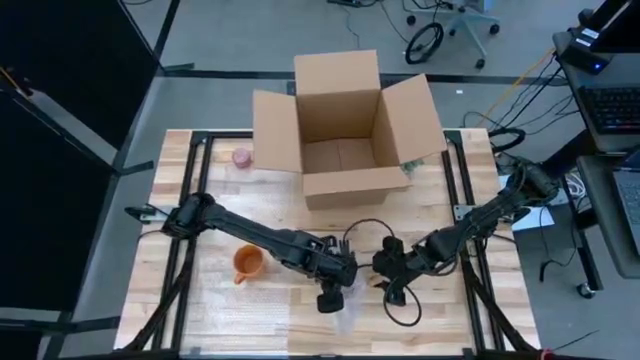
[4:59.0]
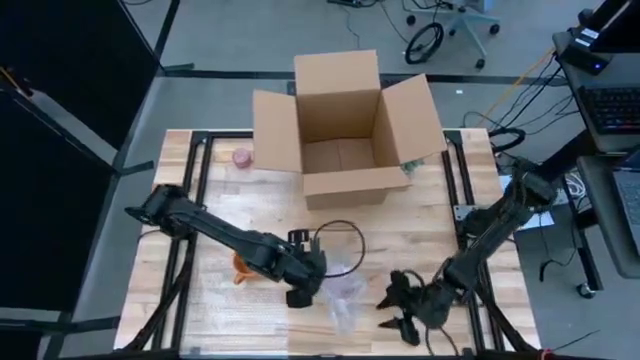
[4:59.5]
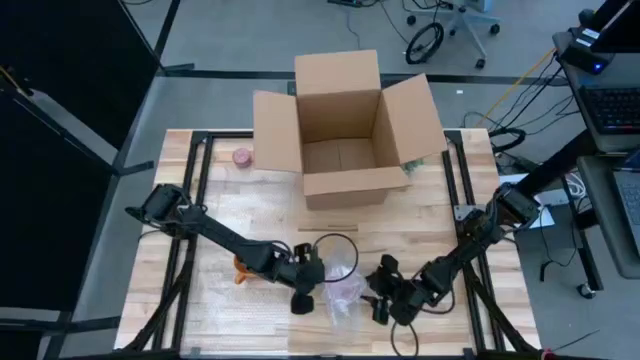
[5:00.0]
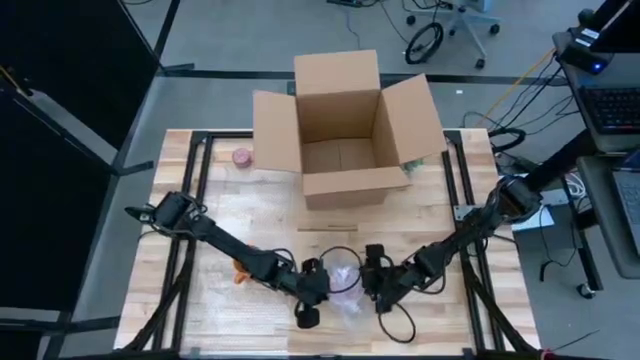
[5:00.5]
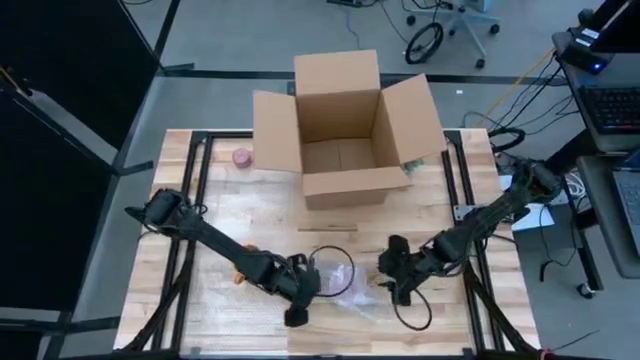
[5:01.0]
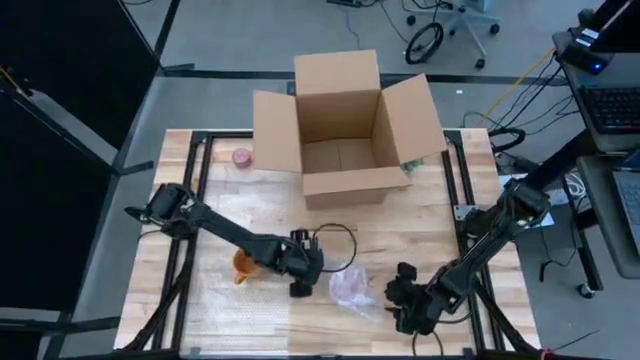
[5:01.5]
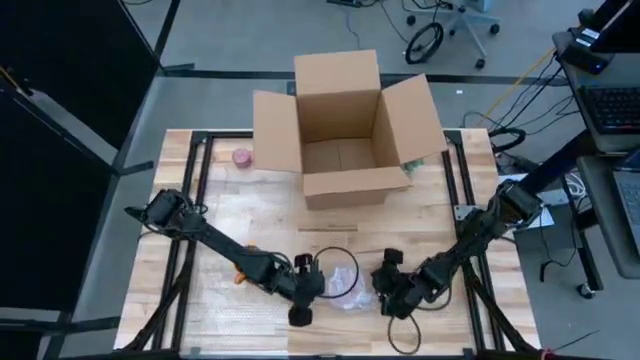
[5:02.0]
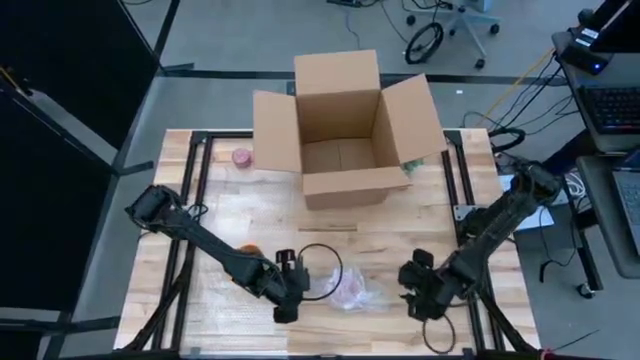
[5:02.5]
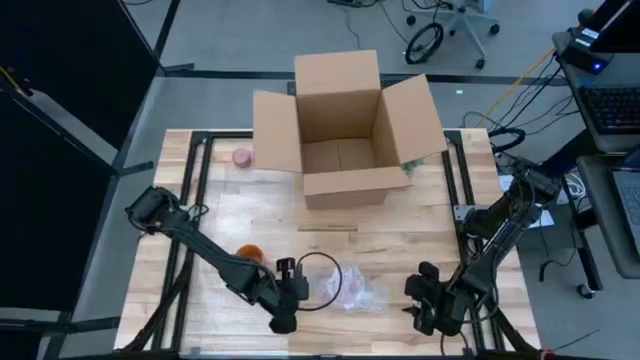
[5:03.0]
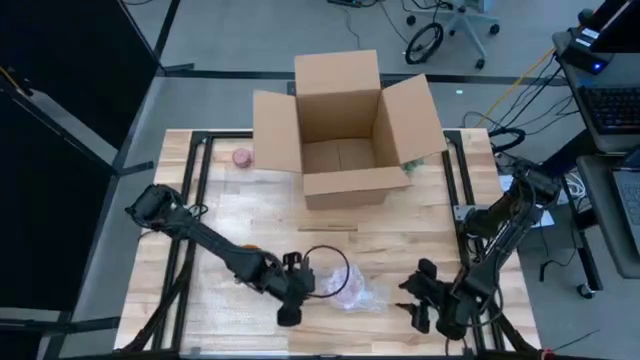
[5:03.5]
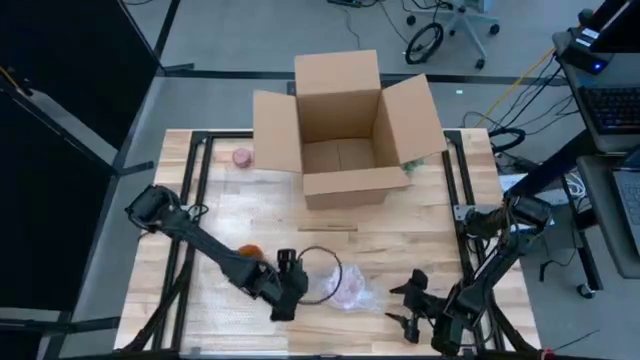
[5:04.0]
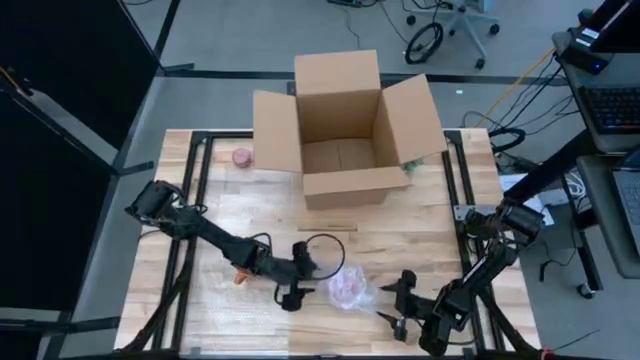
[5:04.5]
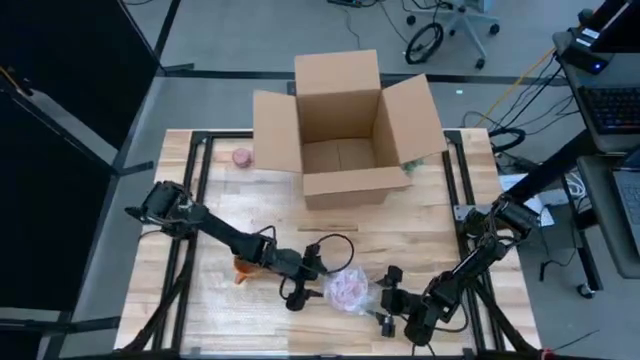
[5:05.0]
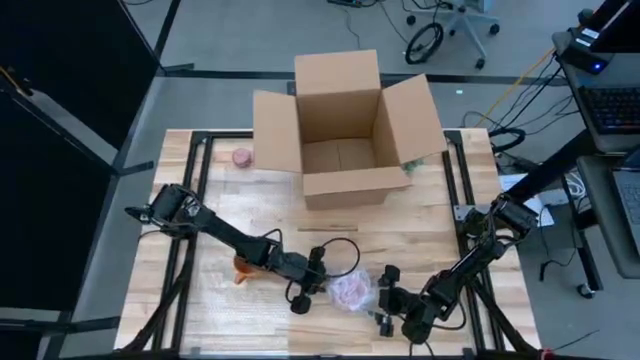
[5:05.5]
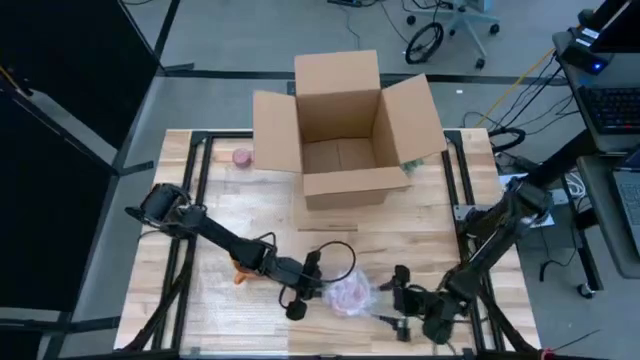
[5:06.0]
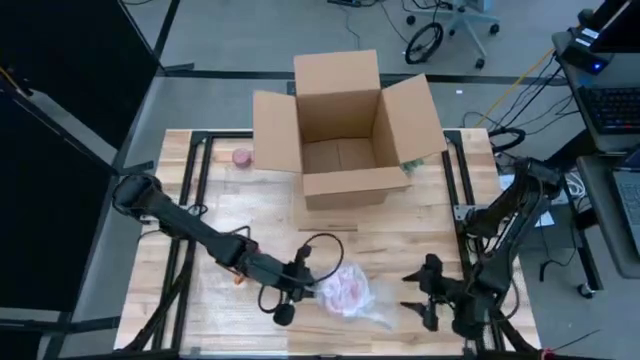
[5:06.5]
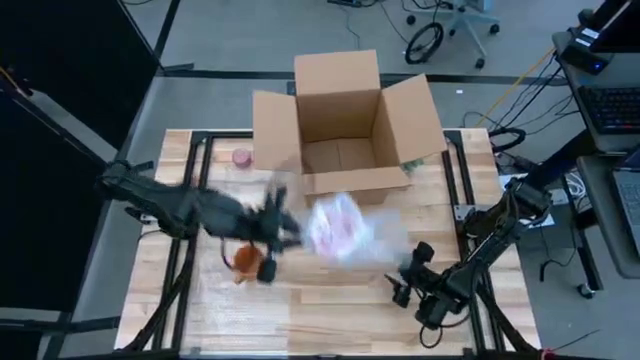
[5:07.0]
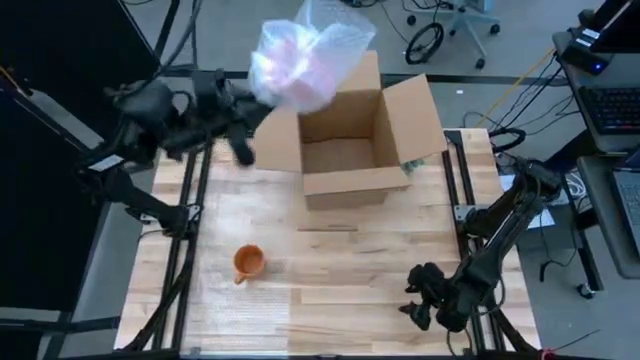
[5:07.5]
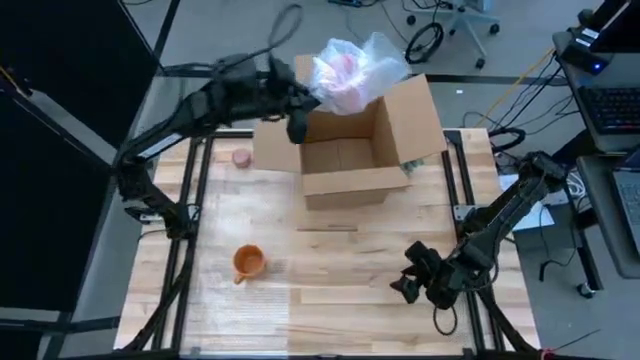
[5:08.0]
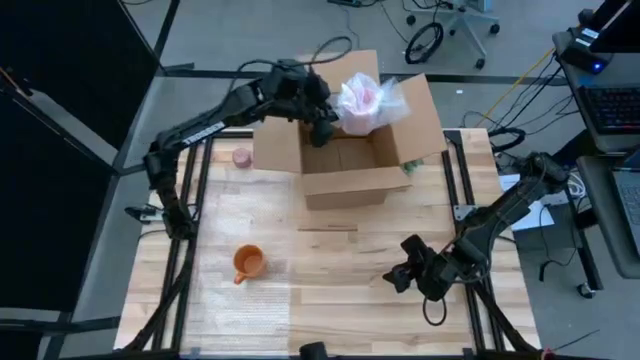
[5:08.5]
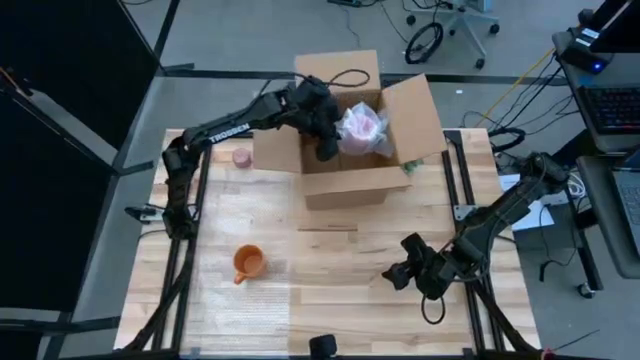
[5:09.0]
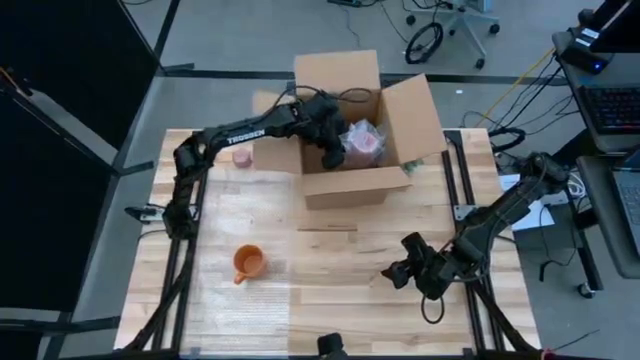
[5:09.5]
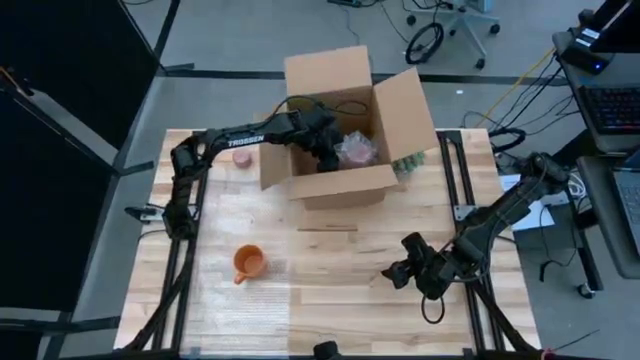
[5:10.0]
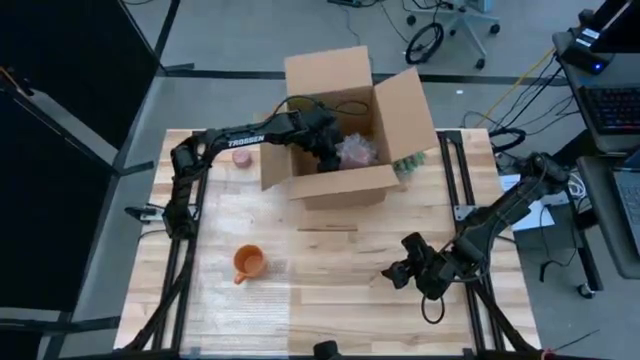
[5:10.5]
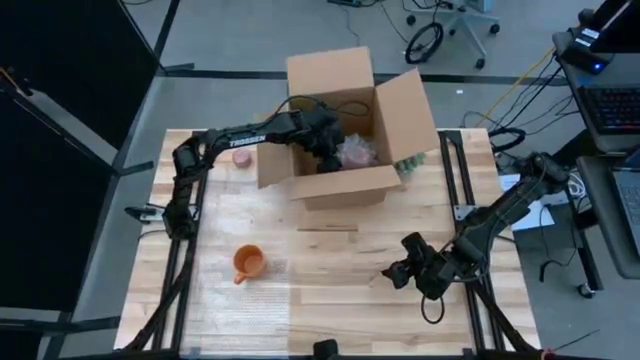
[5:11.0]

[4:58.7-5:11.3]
Task: wrap mug
Put the pink cup into the box

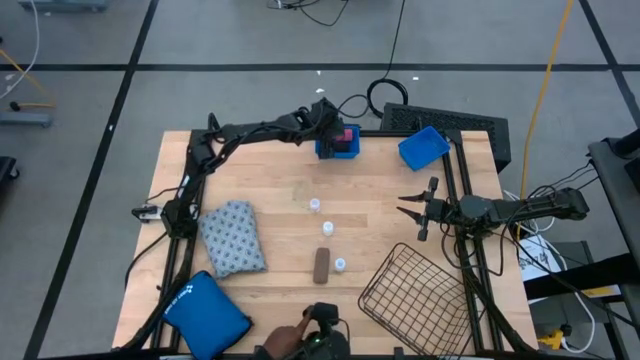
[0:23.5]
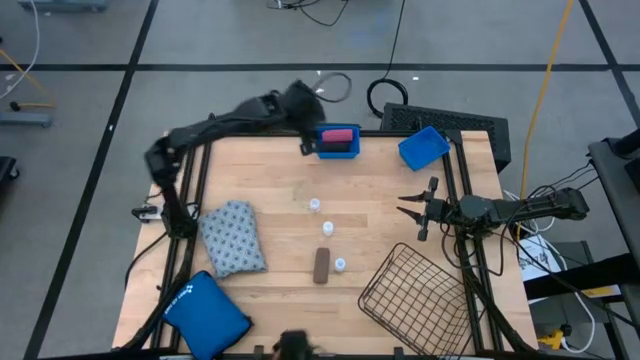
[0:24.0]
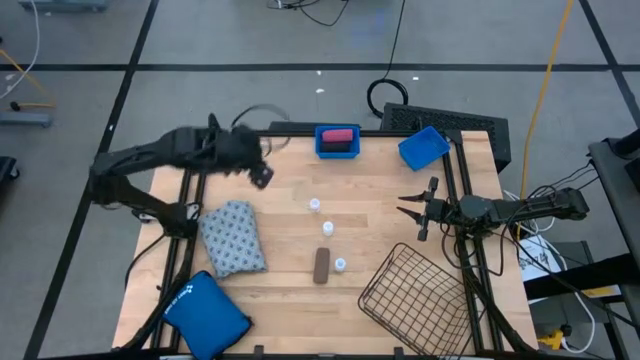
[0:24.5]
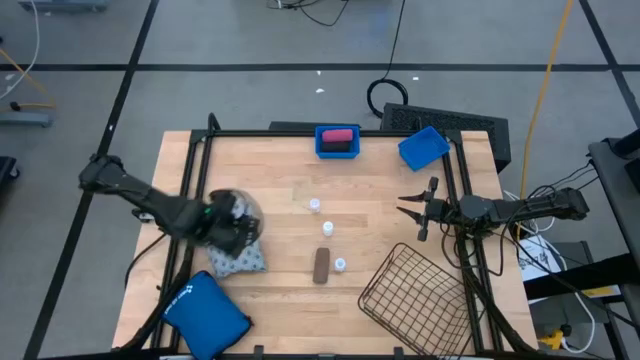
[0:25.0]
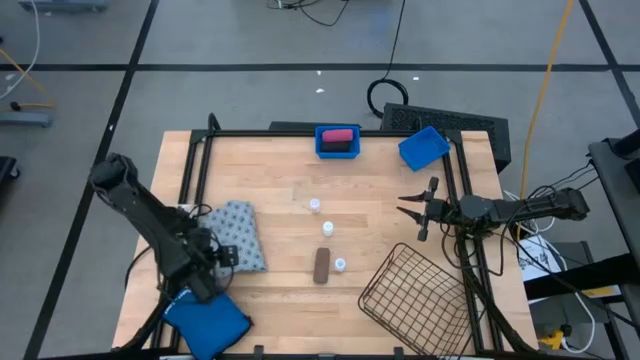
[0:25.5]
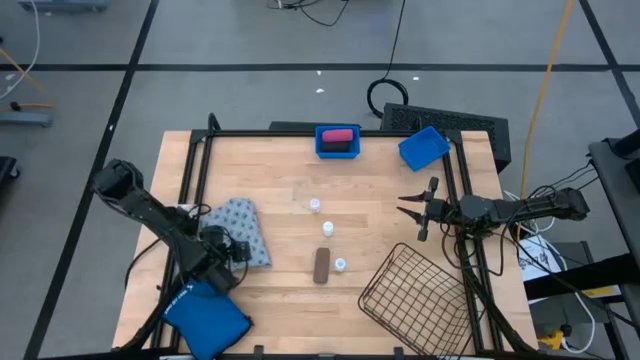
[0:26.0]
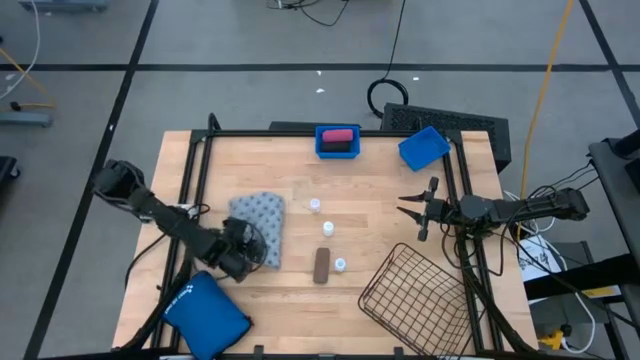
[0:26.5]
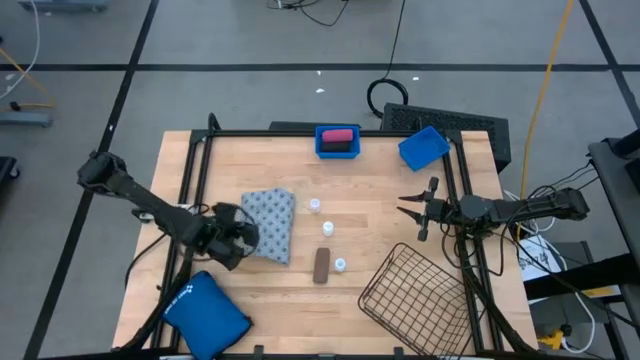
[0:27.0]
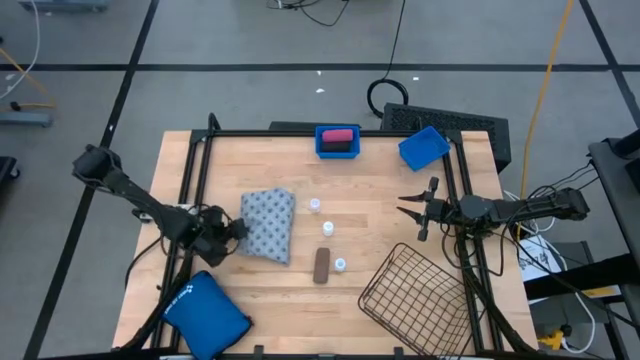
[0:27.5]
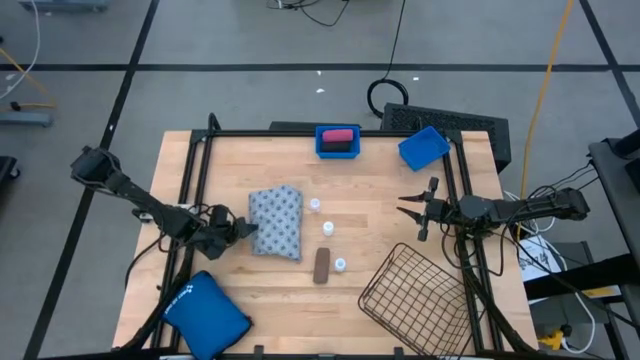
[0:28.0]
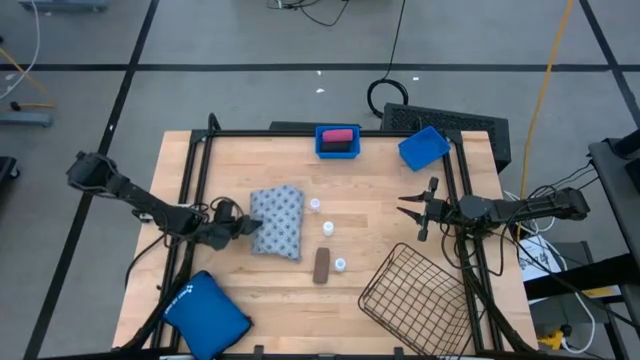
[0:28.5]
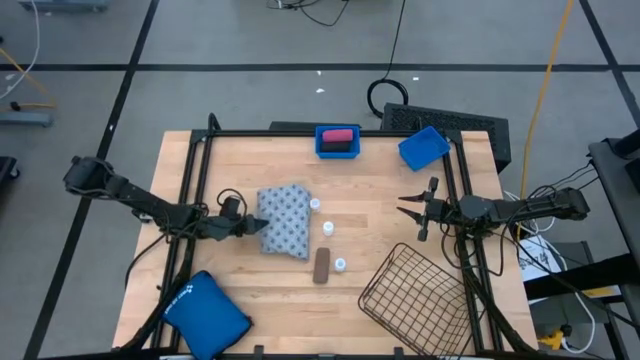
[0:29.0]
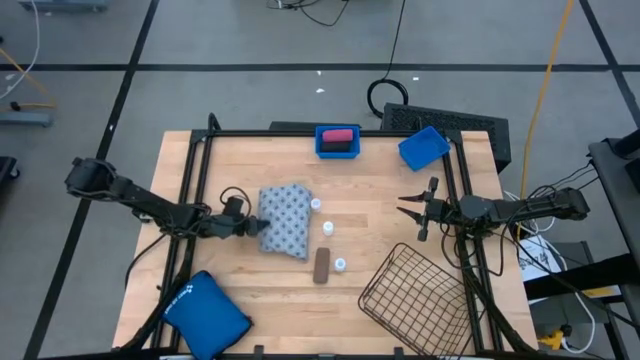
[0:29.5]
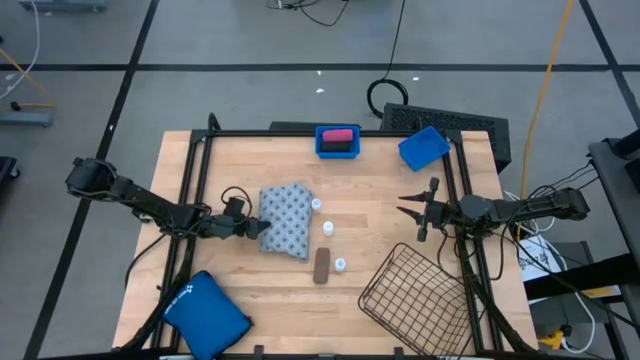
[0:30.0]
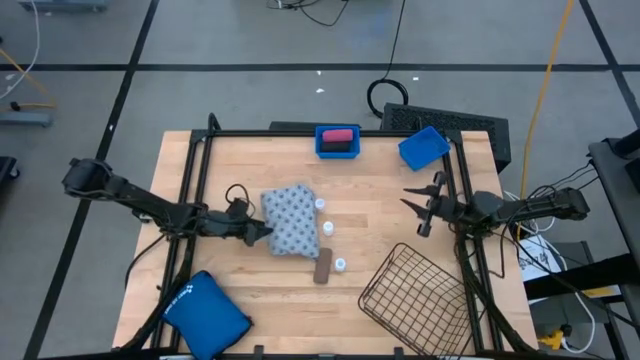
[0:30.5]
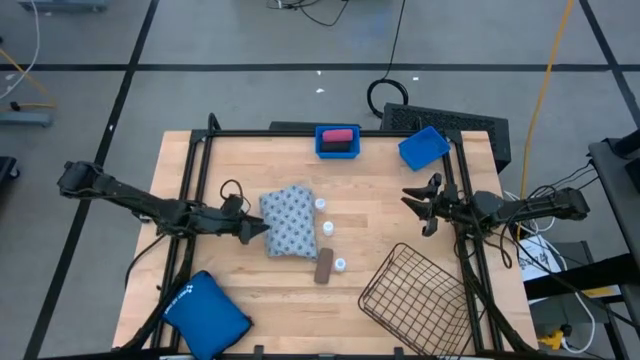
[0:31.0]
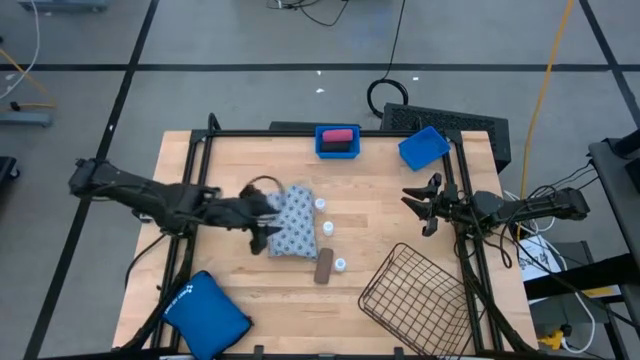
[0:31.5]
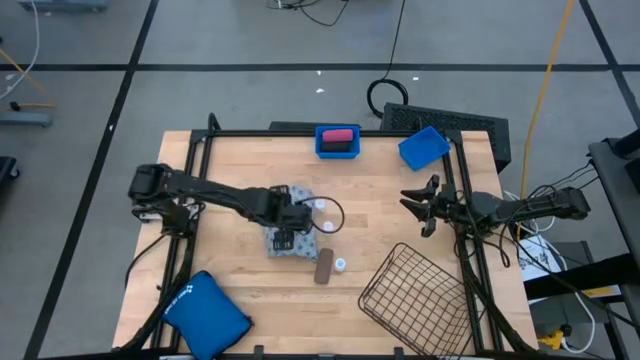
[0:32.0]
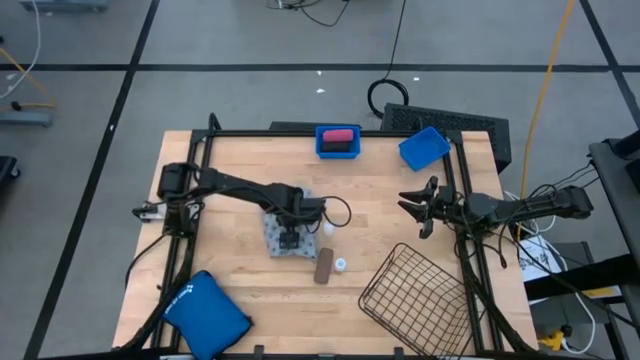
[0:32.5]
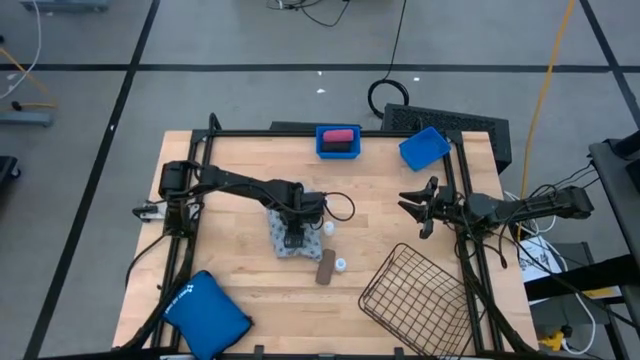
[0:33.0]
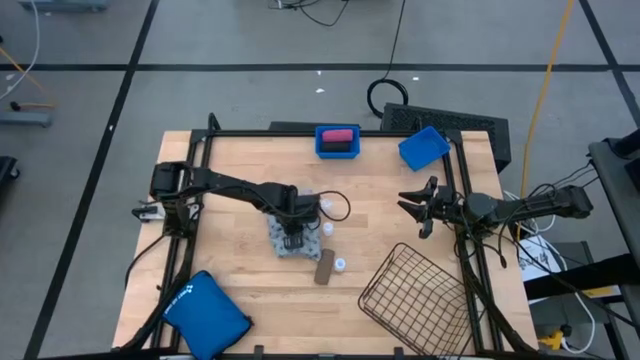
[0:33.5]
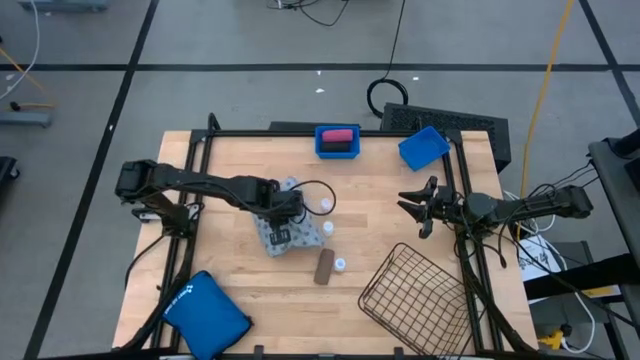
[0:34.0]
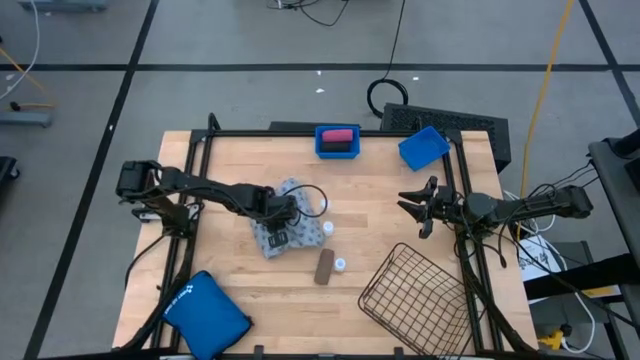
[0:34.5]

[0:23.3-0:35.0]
Task: Pick & Place Medicine items
Move the blue patterned patient gown to the center of the table
